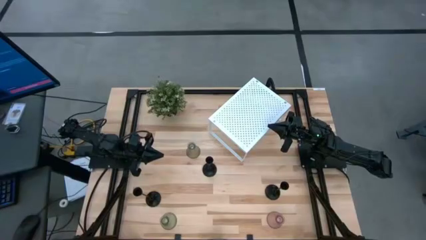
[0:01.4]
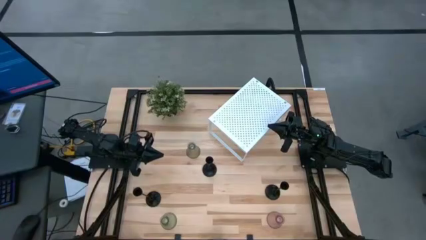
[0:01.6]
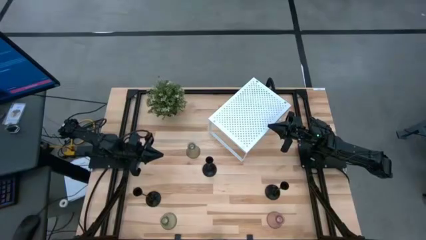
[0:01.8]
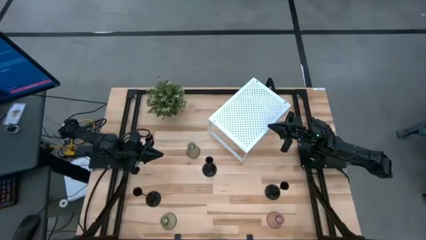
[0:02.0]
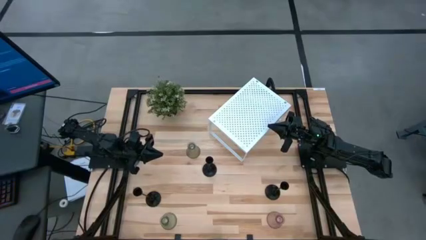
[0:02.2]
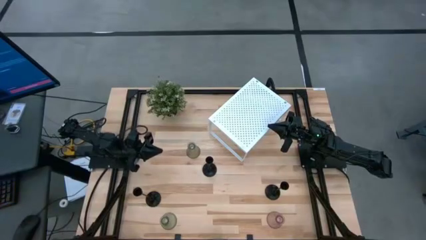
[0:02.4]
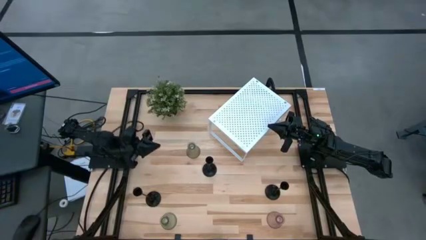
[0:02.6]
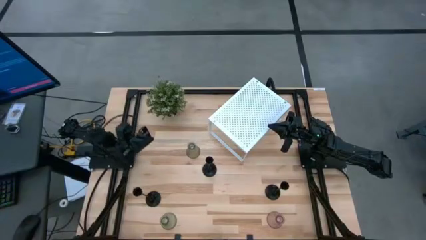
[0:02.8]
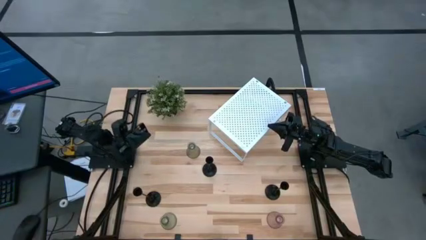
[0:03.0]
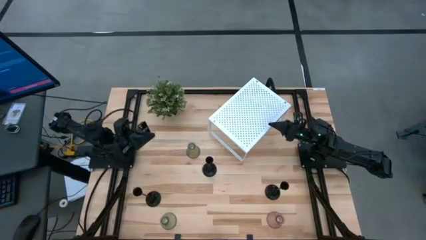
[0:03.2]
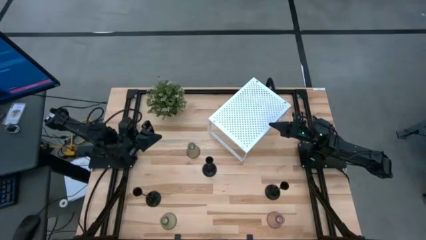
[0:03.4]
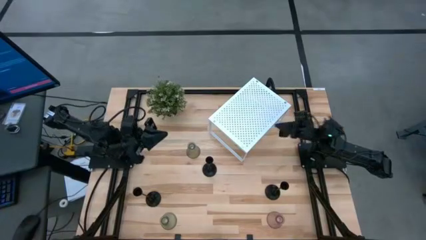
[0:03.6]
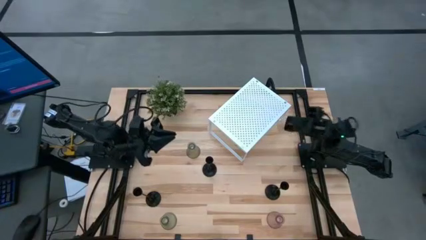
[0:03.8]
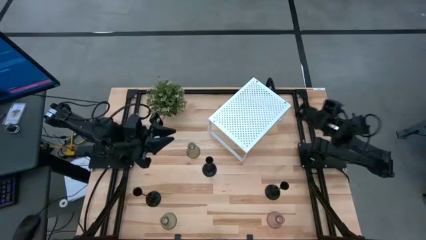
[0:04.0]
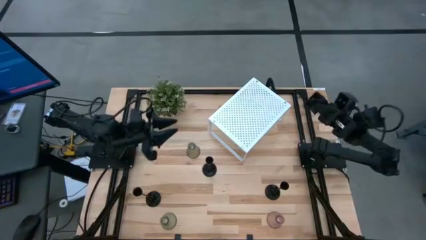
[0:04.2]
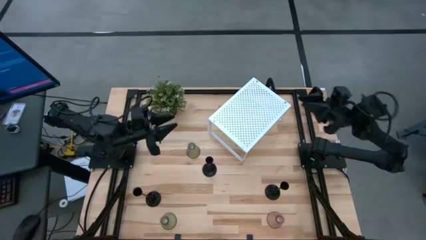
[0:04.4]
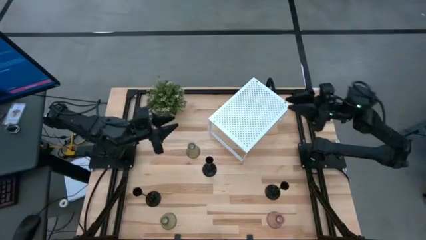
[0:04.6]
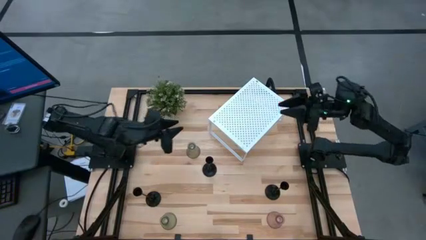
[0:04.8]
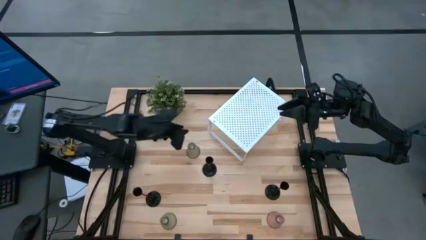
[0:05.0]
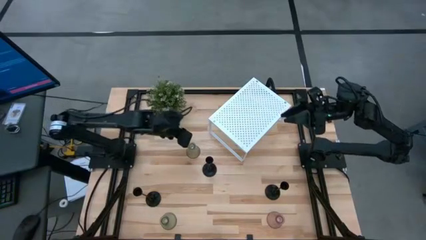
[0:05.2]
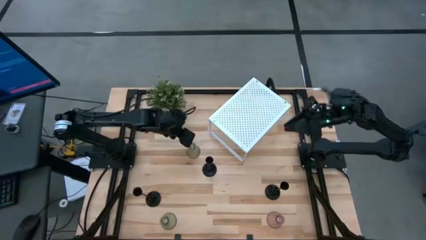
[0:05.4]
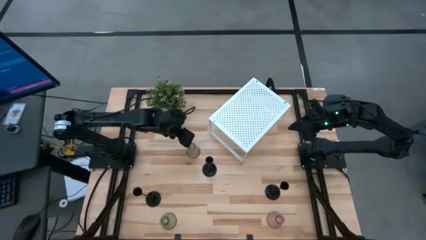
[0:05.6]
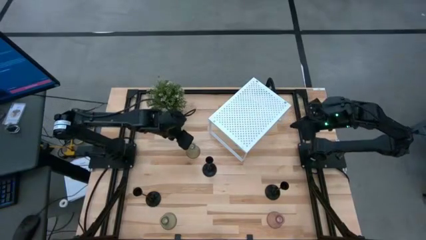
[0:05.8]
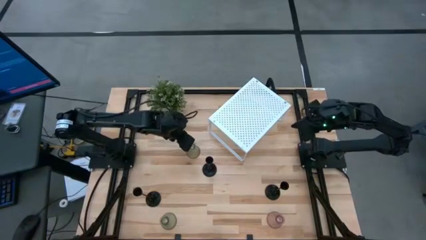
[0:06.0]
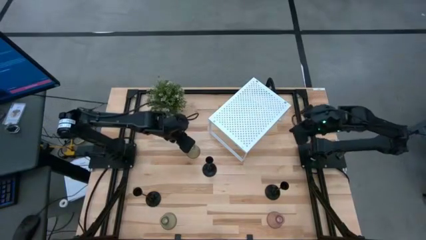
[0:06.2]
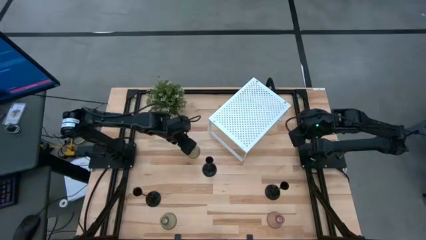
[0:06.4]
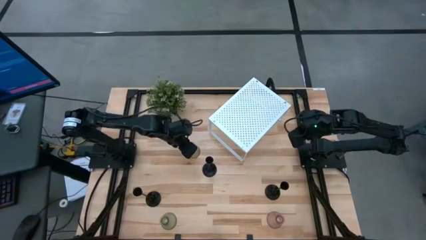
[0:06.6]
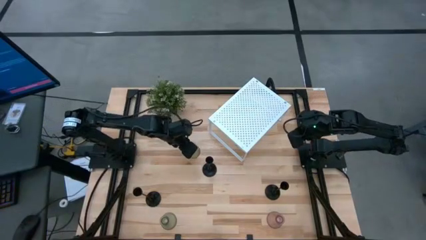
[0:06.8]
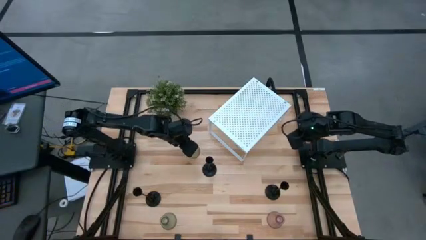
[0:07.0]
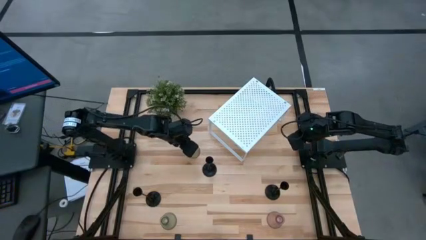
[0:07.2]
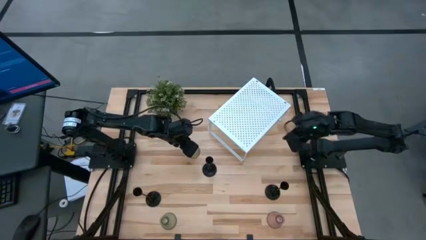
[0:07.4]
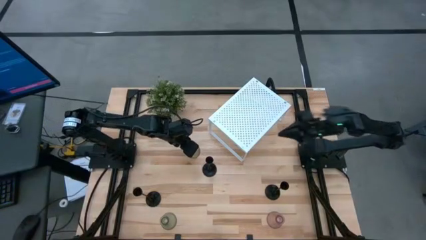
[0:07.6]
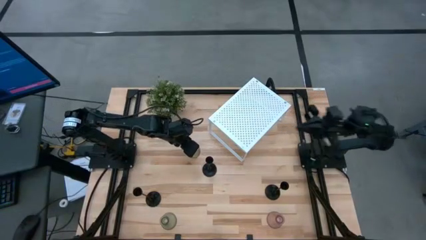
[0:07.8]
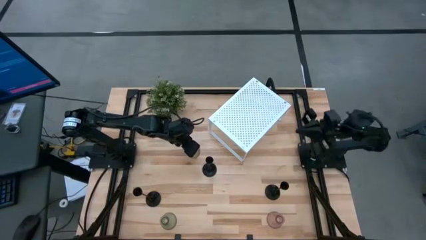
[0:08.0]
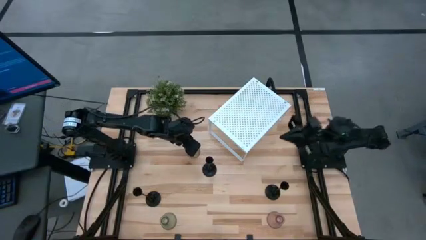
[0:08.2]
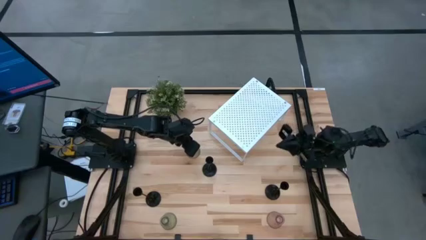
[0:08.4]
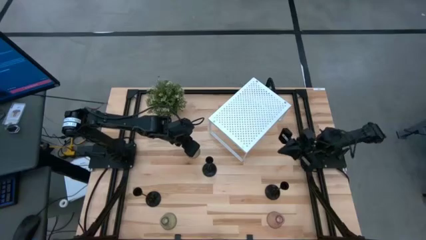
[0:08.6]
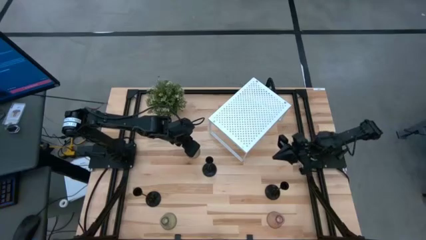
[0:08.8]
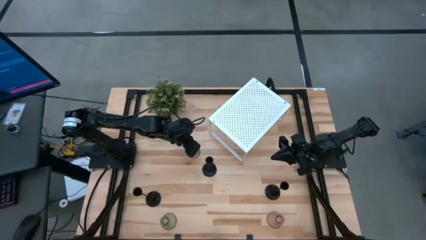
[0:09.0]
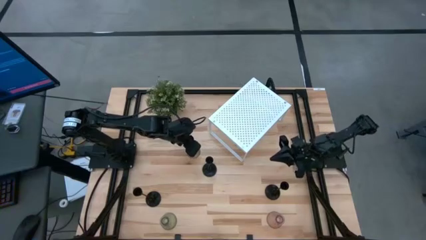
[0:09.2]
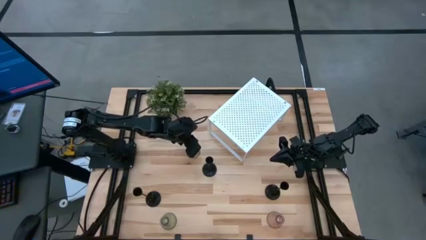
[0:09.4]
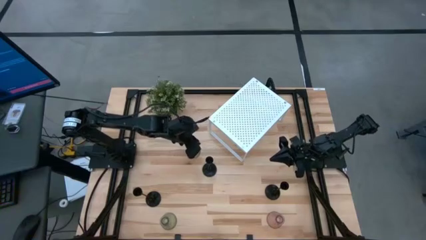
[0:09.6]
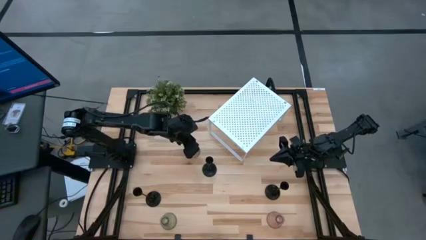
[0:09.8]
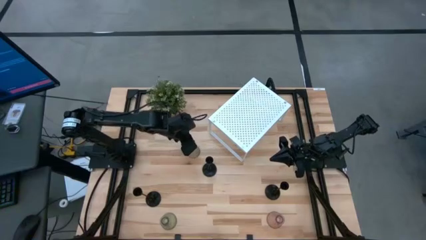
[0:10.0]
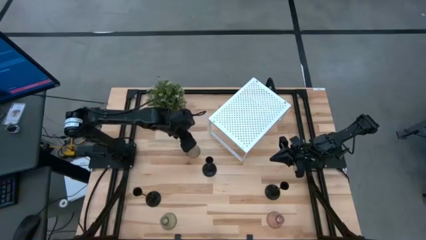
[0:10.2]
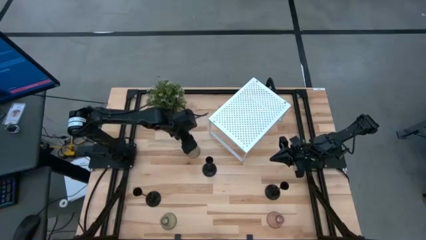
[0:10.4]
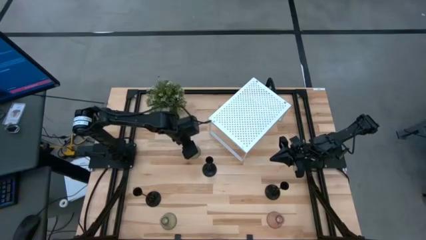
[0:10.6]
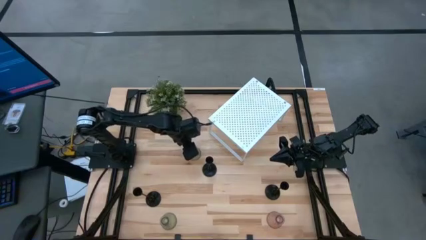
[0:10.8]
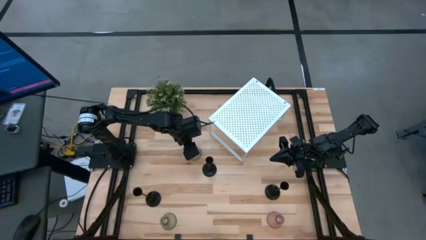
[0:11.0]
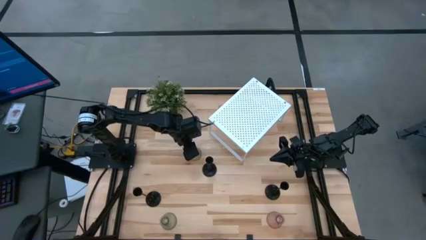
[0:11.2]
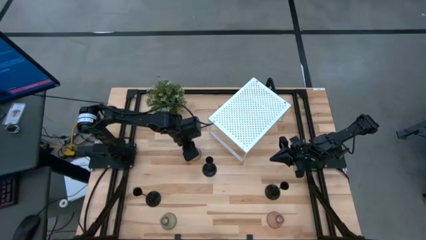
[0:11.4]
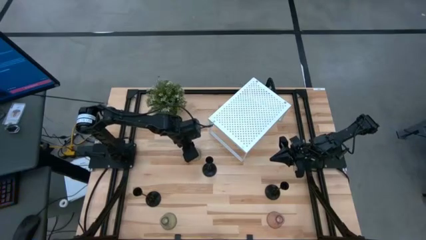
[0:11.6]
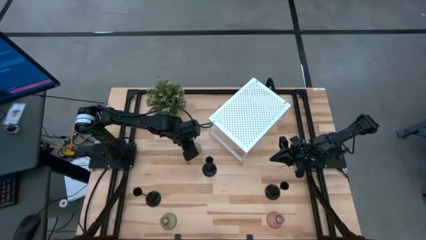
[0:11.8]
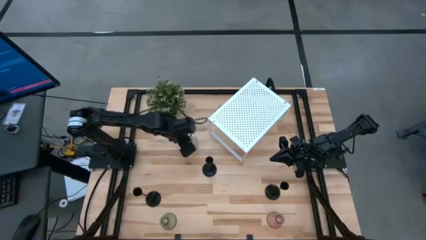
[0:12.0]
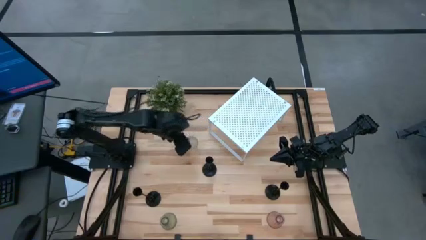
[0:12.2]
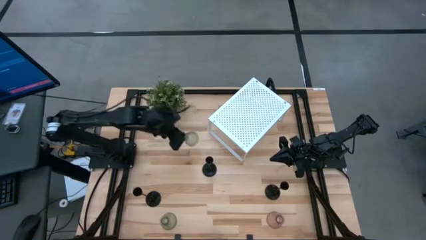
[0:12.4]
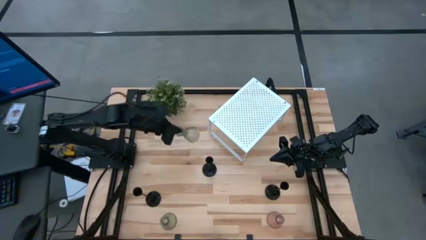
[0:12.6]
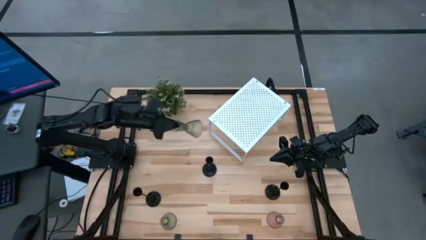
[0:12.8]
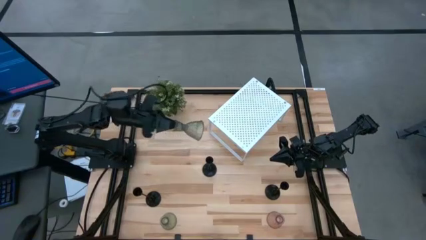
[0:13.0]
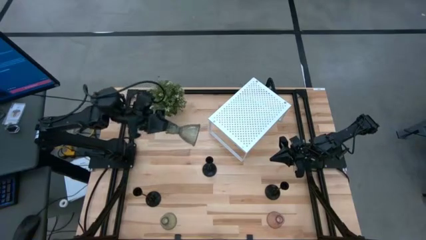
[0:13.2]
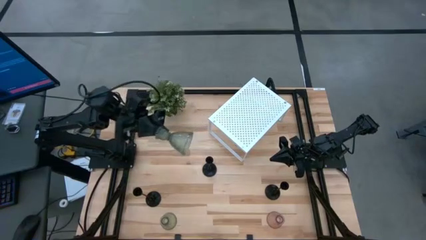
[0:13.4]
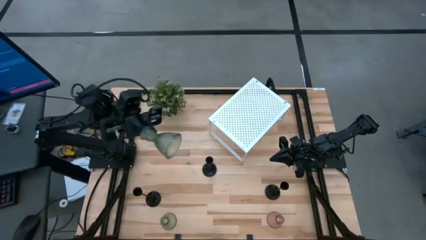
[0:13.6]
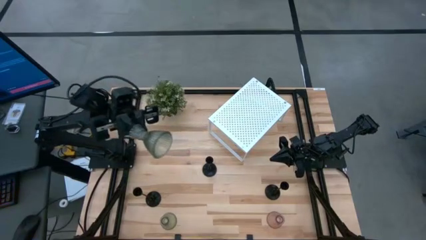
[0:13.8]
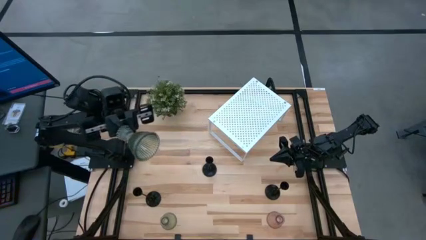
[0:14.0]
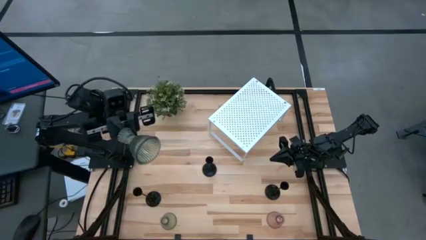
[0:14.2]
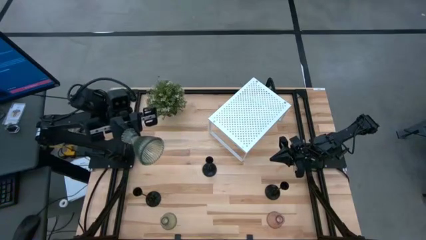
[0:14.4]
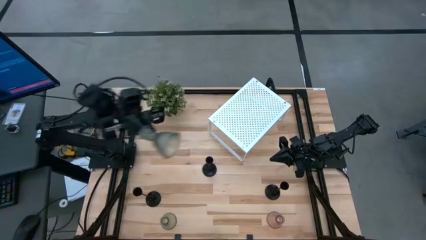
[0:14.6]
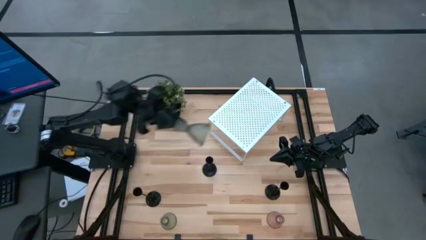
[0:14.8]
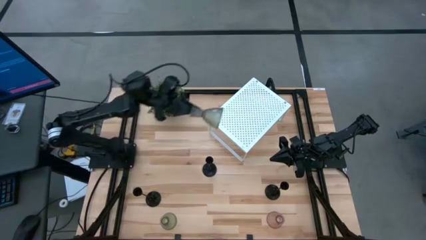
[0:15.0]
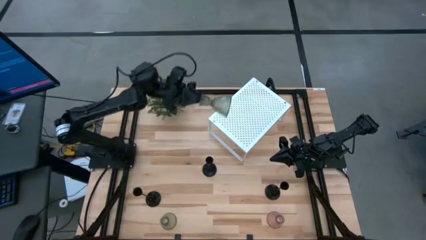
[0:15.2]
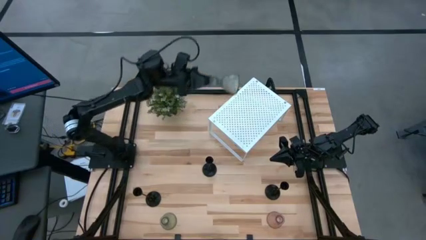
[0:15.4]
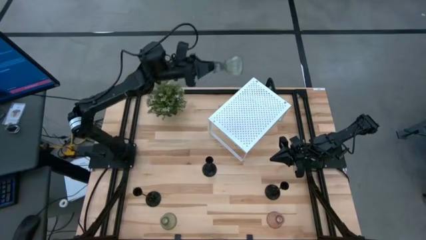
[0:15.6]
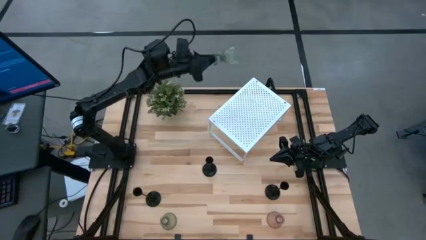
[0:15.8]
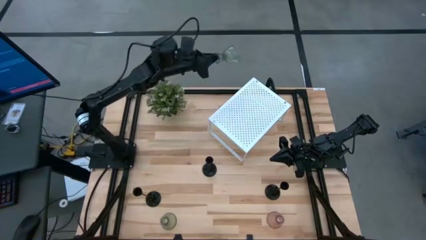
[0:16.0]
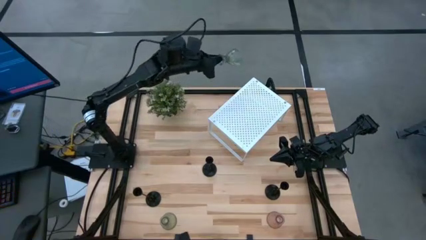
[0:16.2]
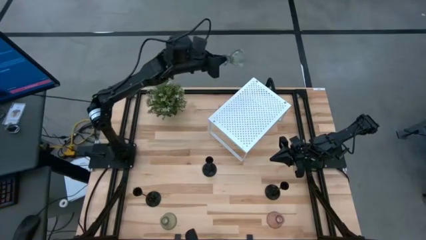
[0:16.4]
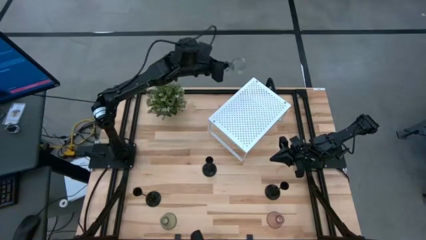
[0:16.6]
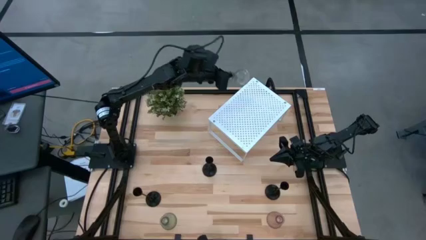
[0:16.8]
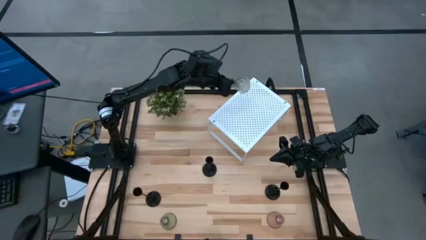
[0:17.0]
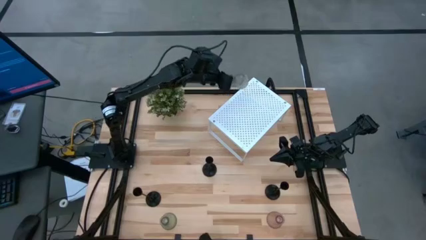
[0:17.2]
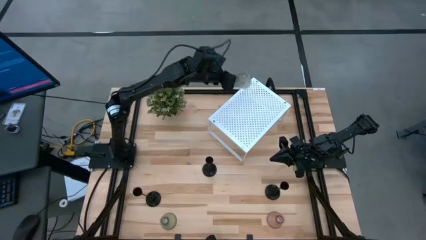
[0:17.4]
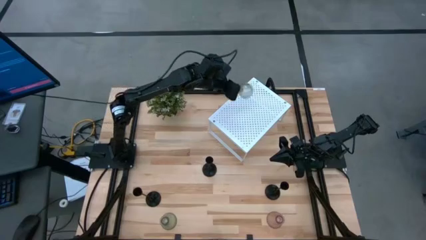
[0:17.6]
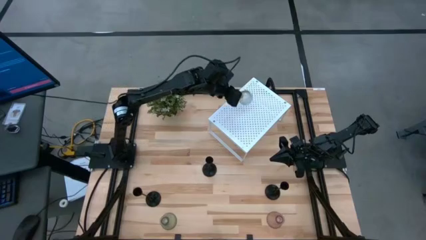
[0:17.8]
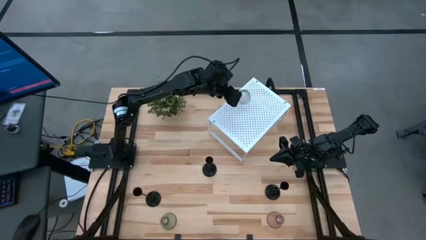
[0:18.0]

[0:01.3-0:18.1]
Task: Pick & Place candle stick holders
Put the top green glass candle holder on the shelf
